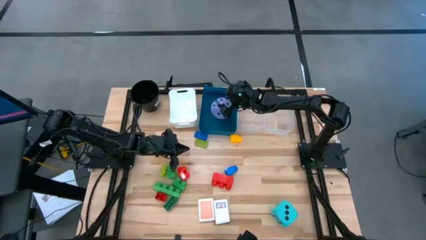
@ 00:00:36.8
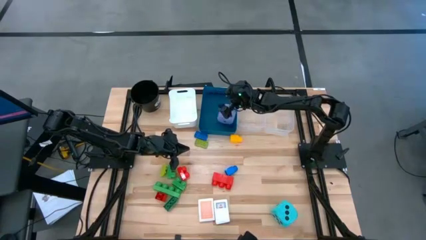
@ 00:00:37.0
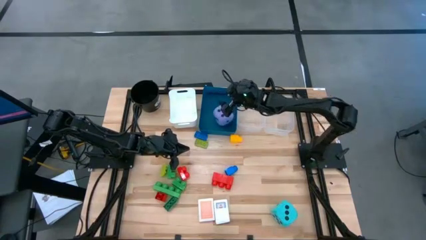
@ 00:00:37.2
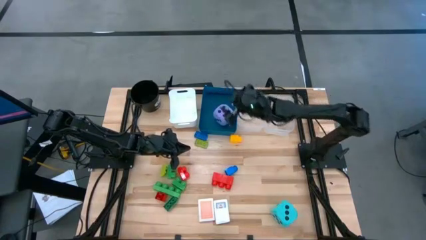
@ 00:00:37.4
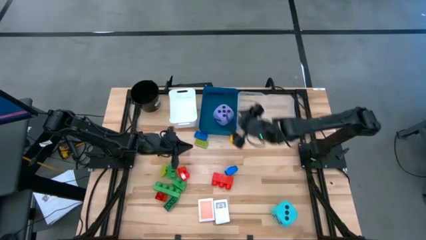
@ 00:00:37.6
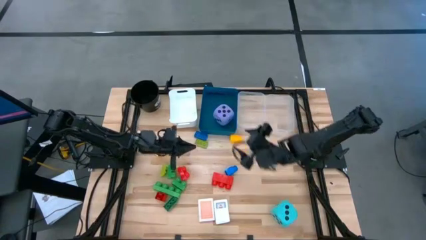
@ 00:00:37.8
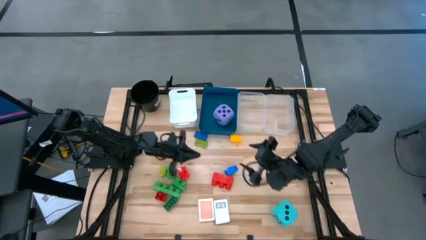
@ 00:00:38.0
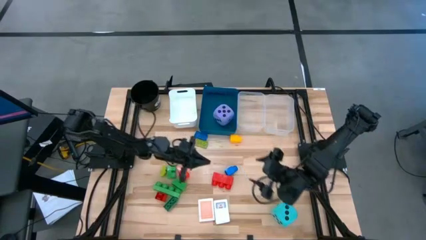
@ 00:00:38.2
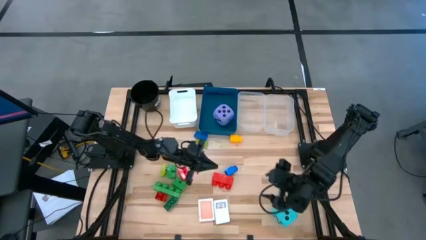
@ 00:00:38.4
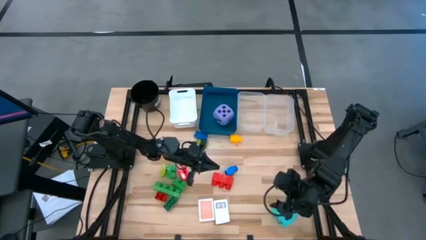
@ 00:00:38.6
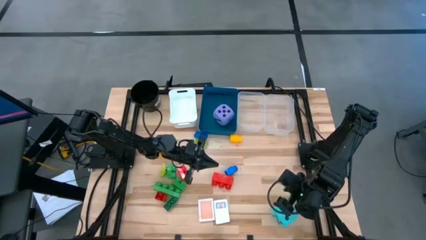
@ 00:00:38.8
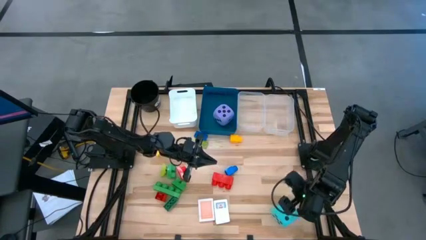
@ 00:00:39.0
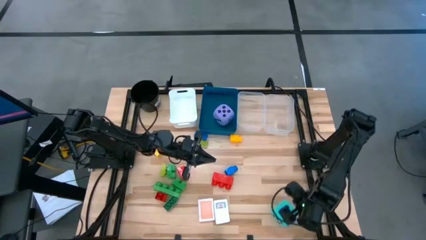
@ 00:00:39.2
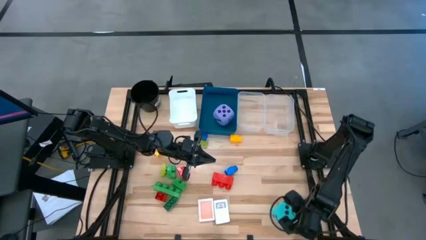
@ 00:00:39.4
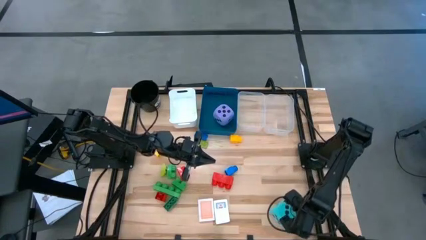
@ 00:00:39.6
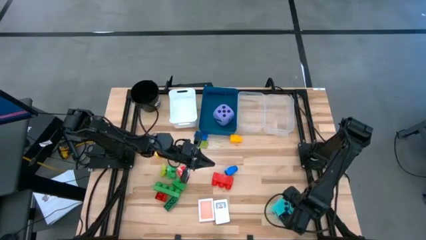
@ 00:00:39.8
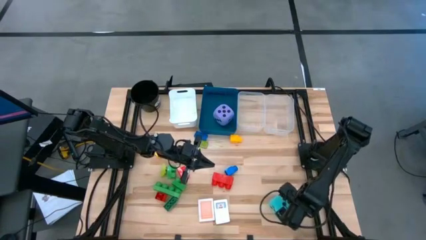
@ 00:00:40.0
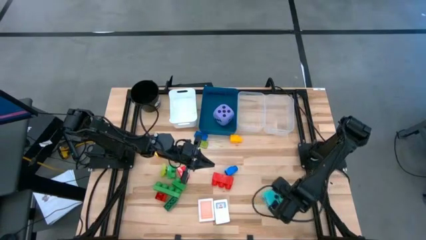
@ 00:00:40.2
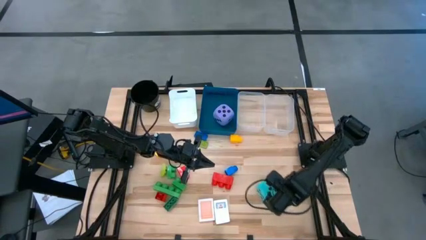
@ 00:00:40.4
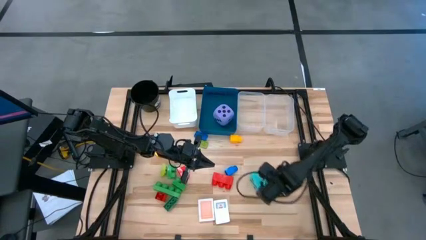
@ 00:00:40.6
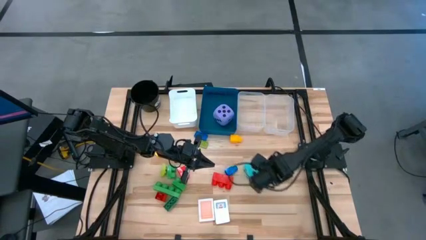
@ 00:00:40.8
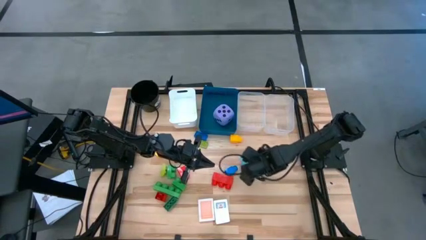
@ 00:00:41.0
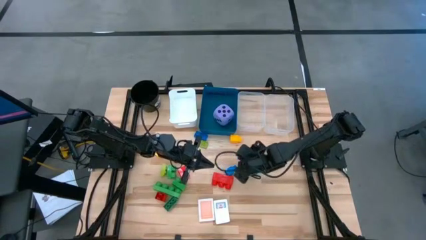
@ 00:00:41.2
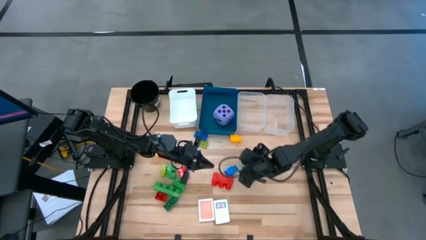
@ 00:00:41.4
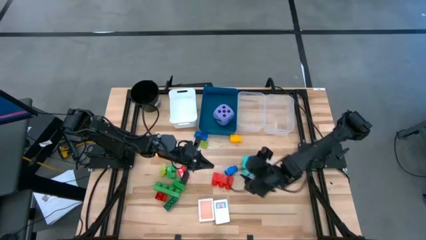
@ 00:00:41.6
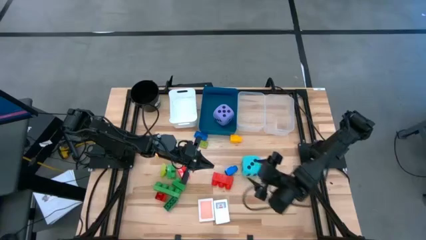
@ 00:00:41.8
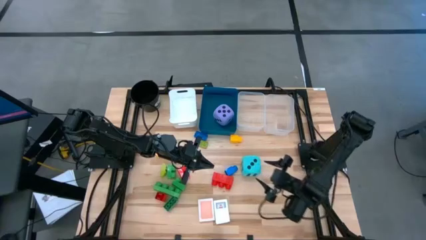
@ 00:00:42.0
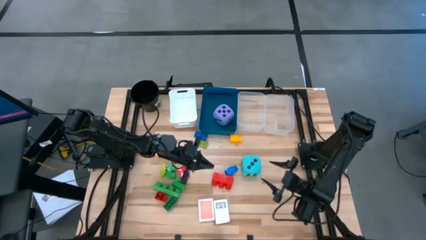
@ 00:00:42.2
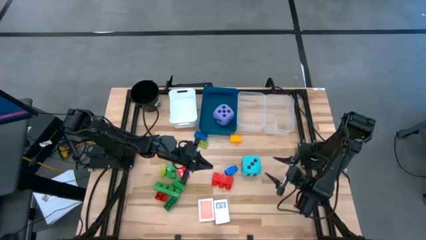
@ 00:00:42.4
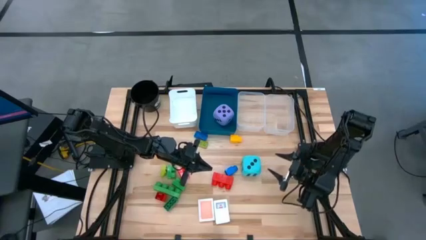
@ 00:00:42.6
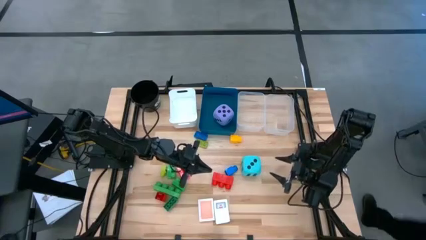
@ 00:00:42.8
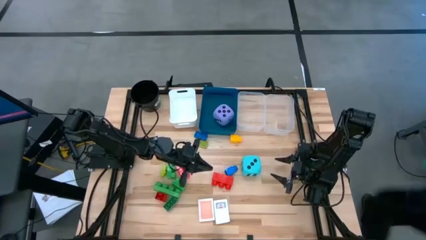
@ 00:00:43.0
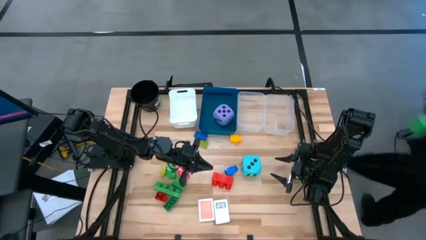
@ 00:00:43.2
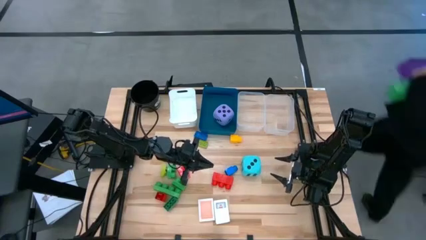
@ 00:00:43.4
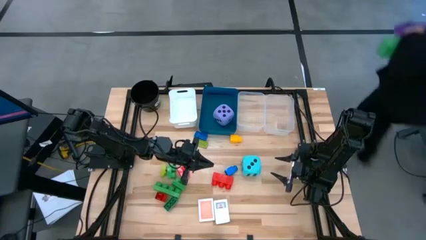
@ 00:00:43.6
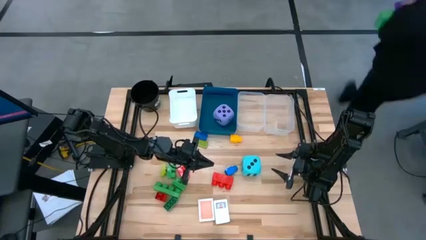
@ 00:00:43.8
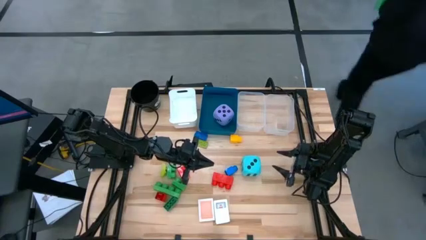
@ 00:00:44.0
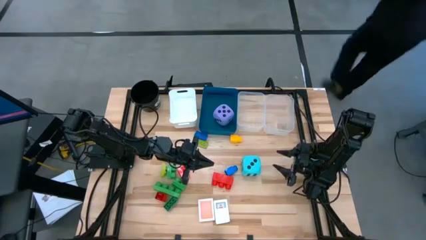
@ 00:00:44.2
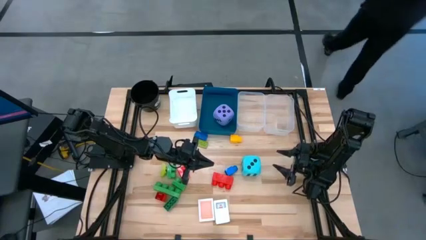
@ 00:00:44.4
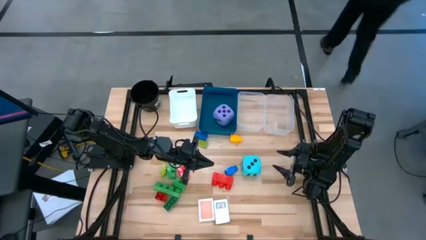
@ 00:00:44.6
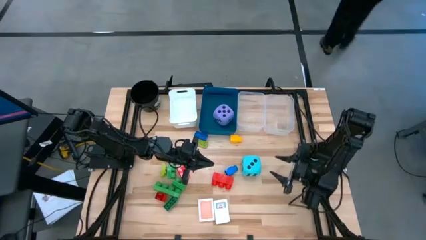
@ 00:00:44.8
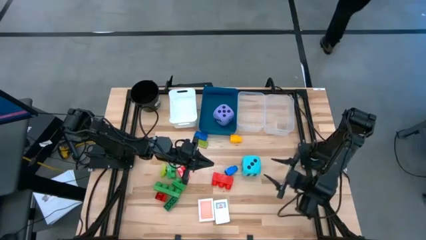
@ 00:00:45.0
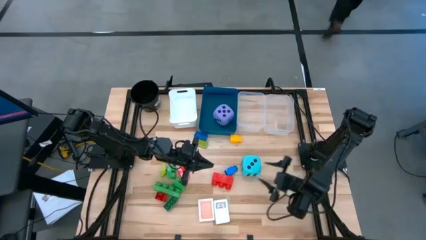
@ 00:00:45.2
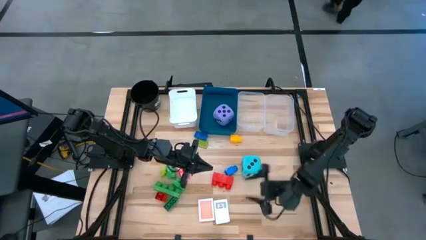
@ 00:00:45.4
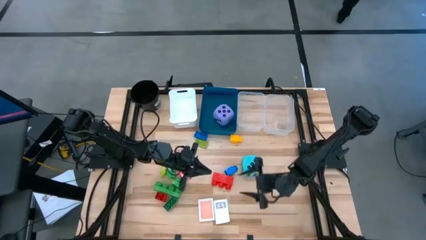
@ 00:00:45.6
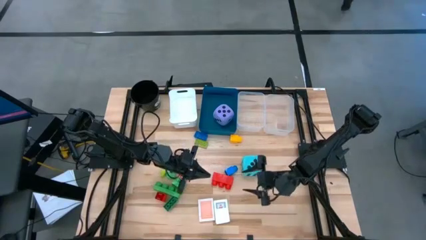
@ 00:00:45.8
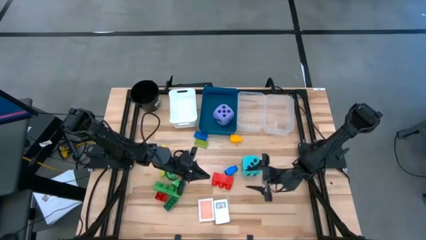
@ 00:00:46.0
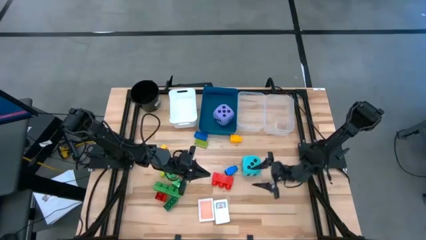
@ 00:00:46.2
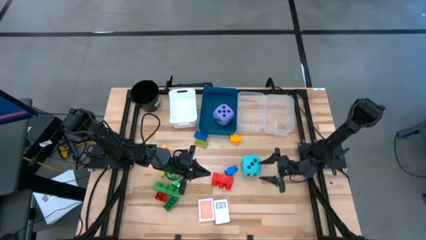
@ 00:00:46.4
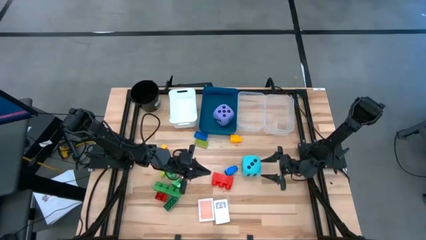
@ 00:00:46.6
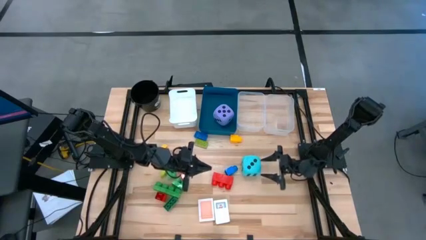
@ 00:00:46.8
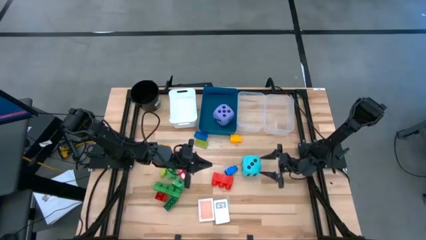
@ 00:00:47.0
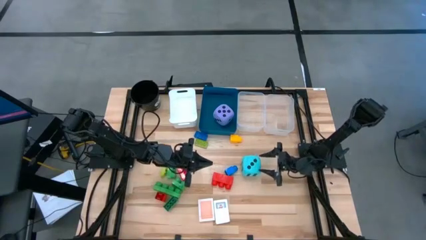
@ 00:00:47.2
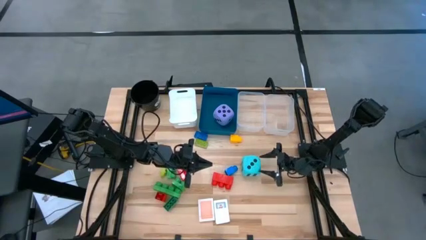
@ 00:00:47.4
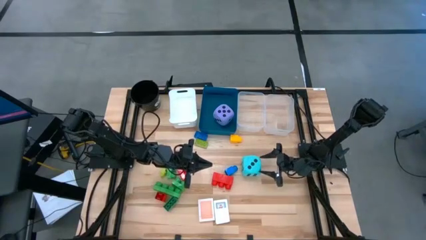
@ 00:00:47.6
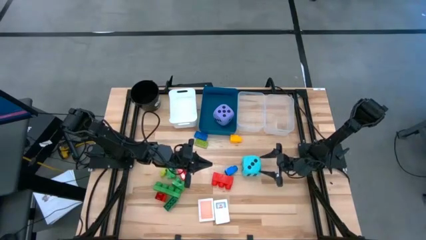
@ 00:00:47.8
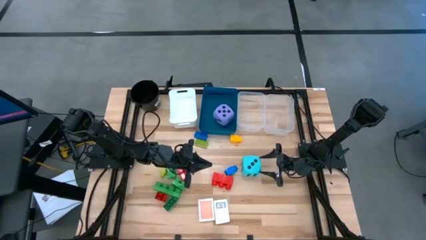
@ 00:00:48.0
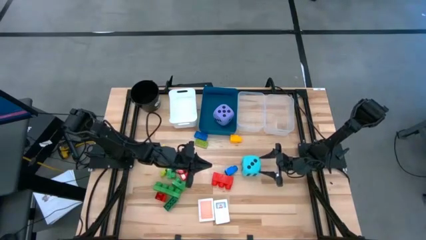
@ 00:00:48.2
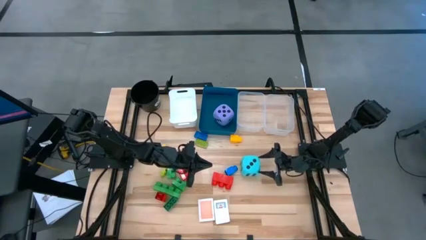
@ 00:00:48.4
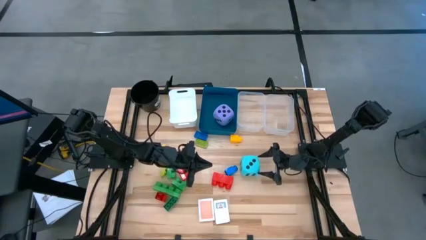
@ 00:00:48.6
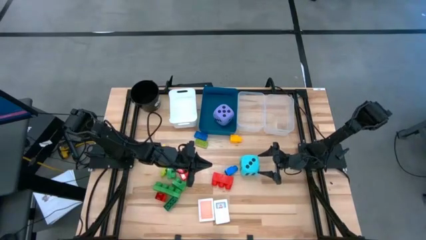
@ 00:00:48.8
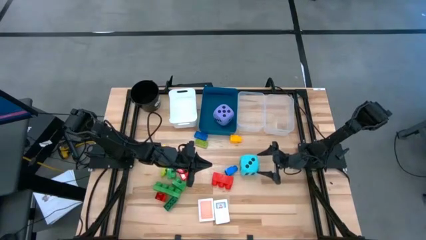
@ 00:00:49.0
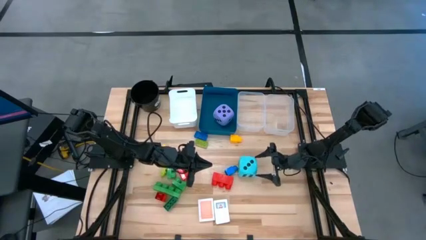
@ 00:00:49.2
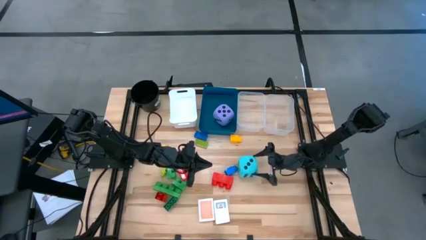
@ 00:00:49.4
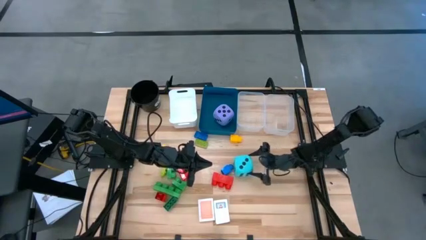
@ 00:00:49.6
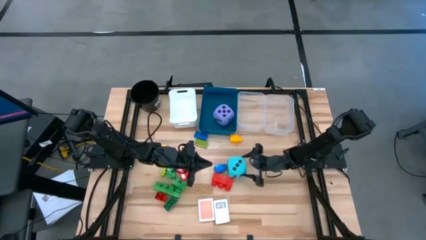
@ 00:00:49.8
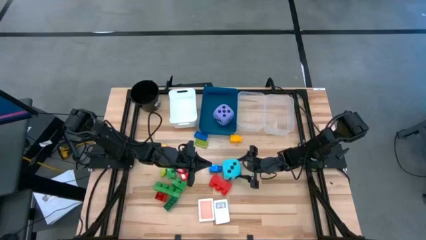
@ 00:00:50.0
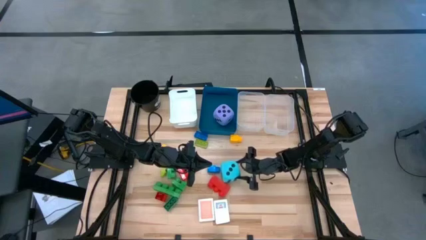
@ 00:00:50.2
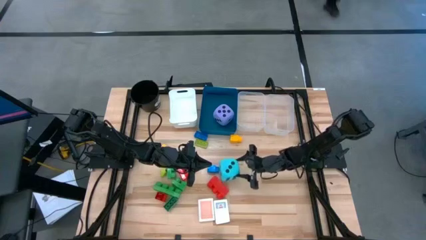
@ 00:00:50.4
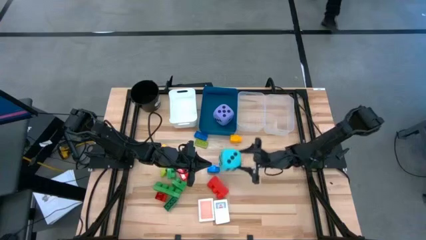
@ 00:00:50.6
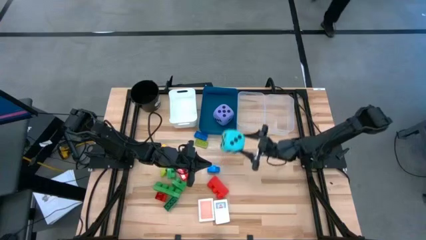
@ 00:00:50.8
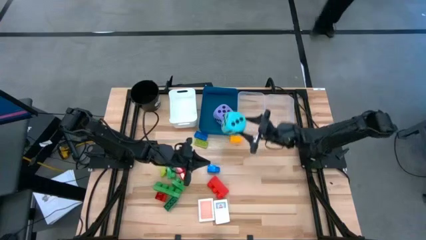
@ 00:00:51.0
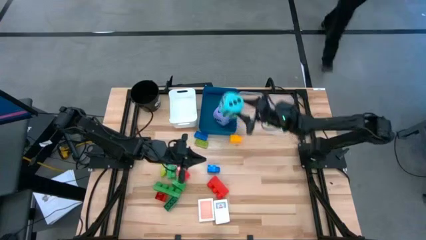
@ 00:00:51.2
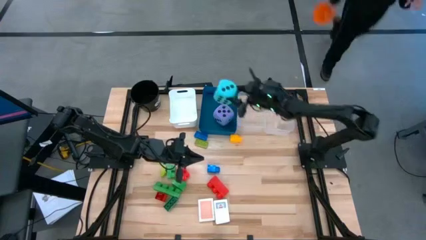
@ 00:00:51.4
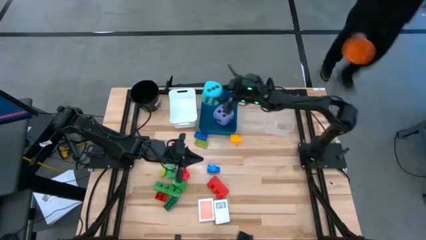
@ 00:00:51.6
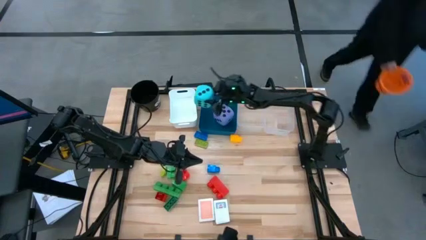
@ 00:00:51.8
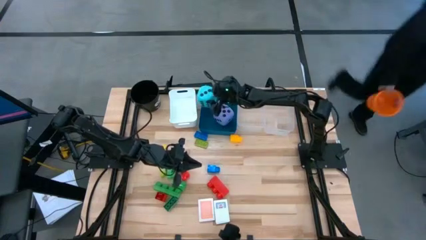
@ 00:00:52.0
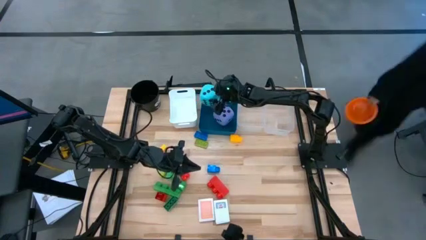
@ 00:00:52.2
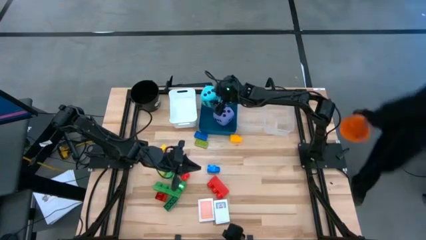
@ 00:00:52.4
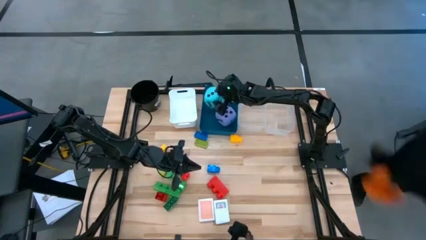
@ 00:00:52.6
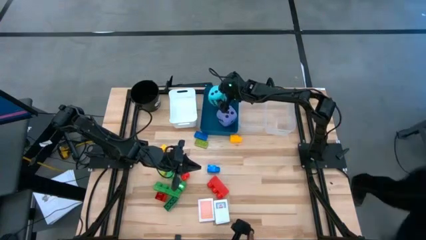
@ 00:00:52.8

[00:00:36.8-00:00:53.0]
Task: Pick & Place Toys
Put the blue dice into the blue bin
